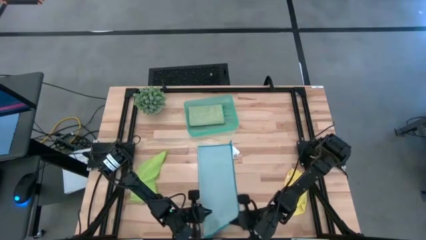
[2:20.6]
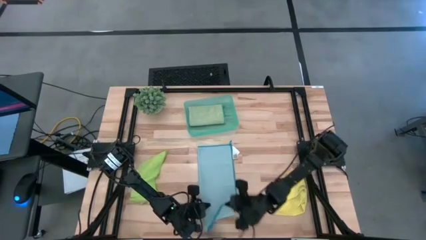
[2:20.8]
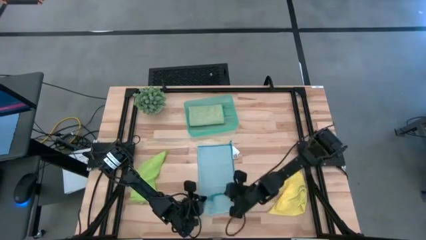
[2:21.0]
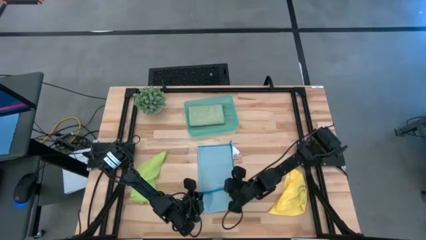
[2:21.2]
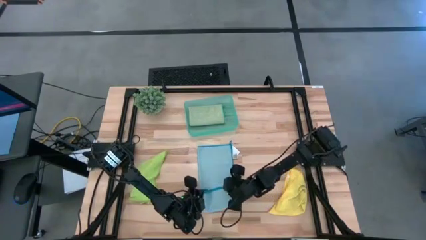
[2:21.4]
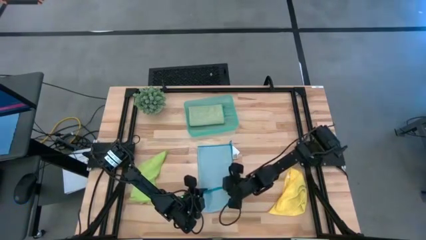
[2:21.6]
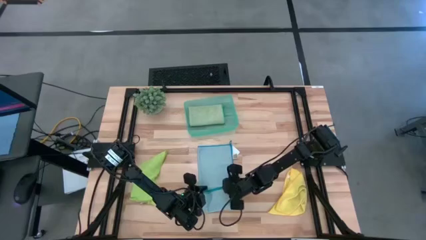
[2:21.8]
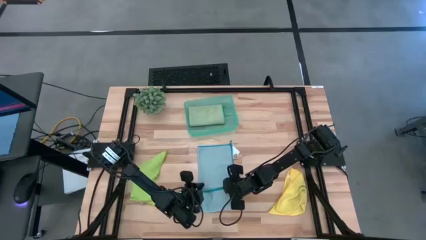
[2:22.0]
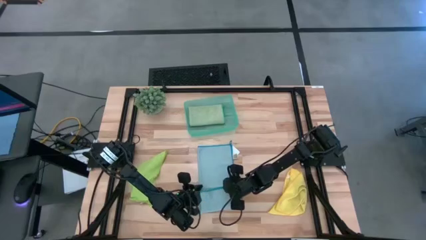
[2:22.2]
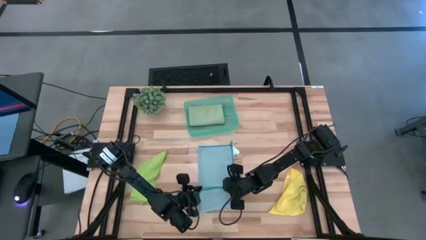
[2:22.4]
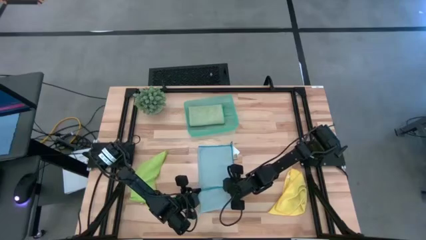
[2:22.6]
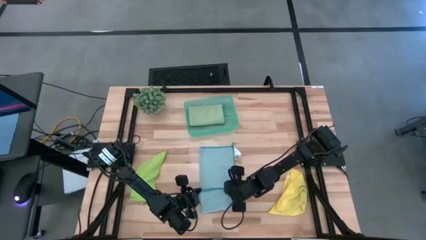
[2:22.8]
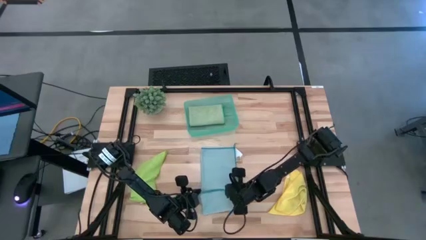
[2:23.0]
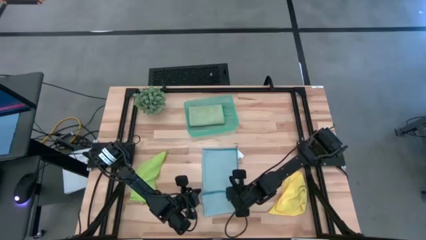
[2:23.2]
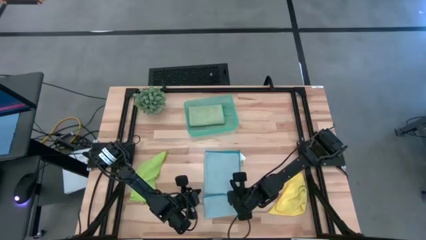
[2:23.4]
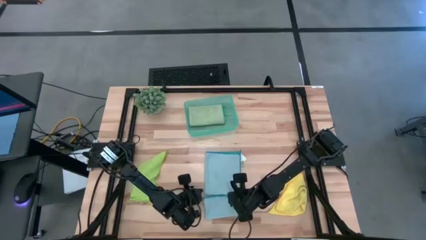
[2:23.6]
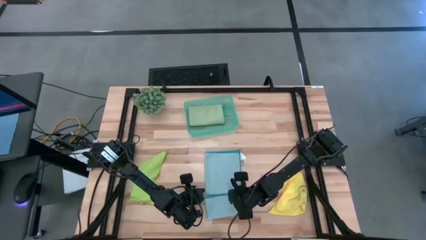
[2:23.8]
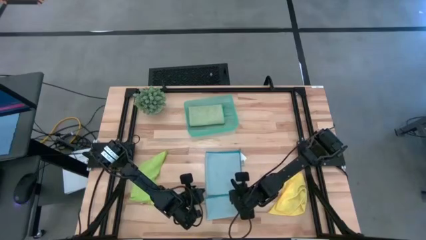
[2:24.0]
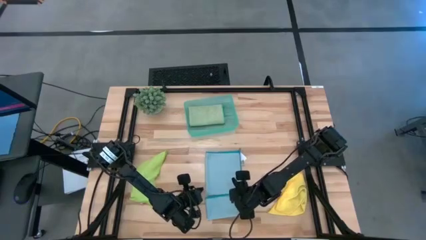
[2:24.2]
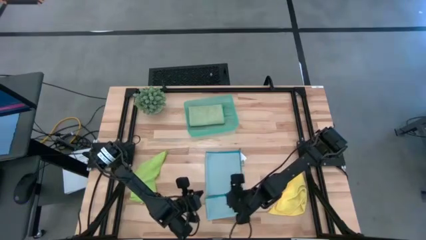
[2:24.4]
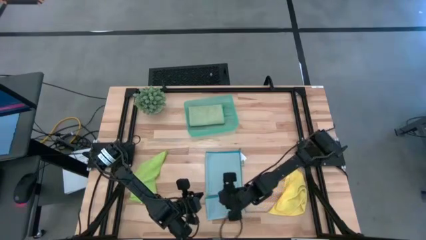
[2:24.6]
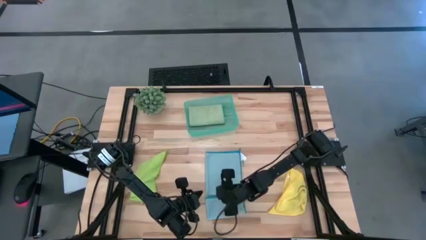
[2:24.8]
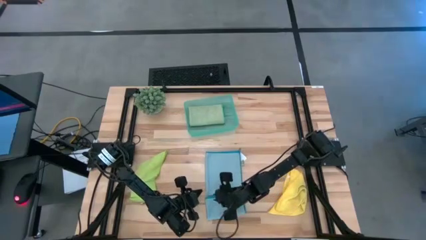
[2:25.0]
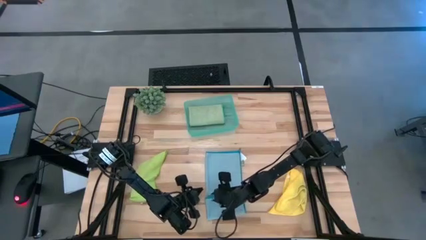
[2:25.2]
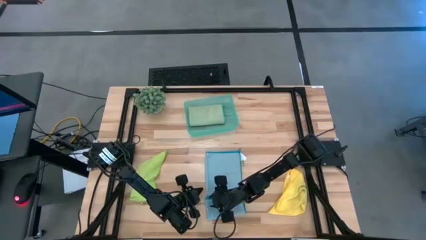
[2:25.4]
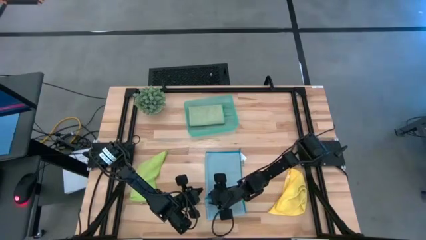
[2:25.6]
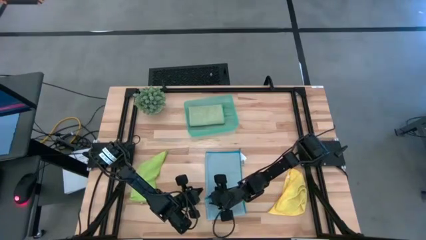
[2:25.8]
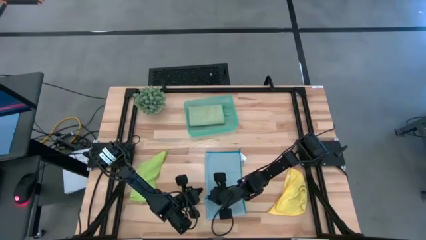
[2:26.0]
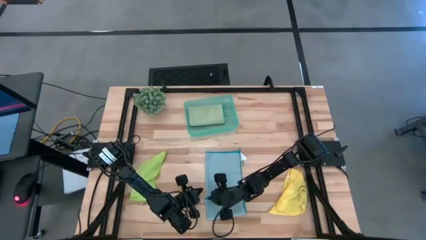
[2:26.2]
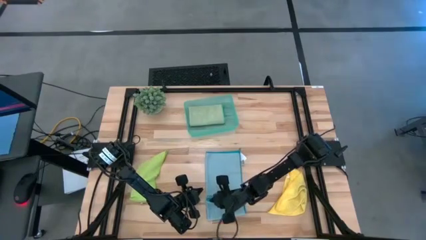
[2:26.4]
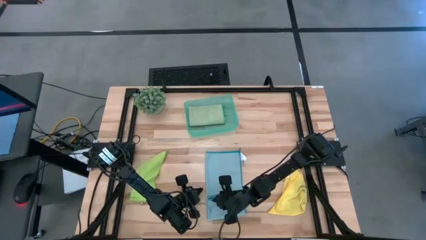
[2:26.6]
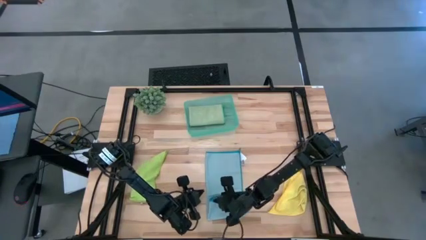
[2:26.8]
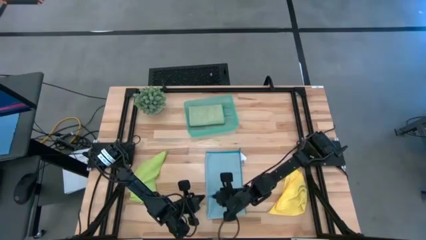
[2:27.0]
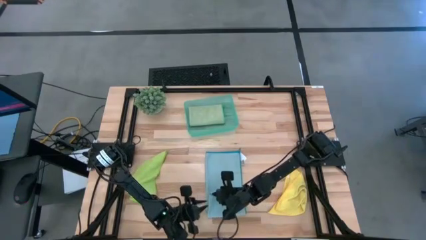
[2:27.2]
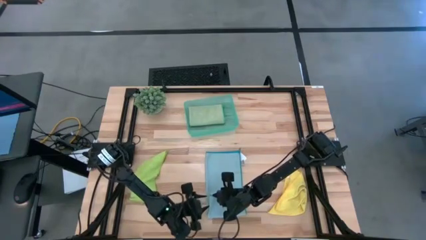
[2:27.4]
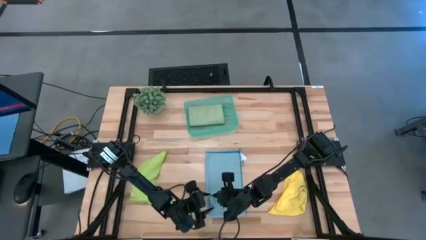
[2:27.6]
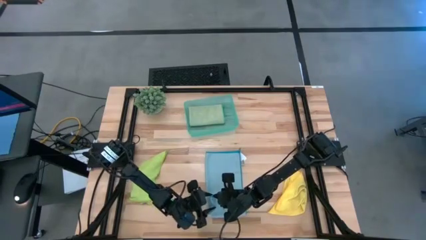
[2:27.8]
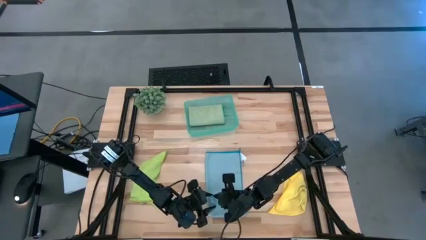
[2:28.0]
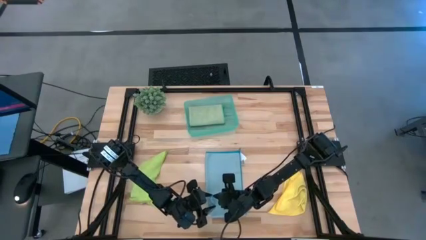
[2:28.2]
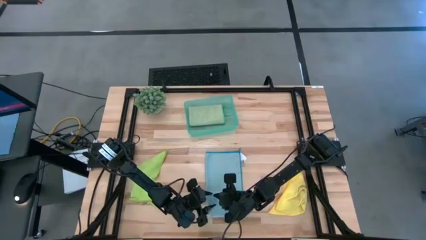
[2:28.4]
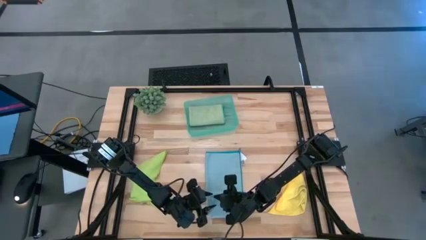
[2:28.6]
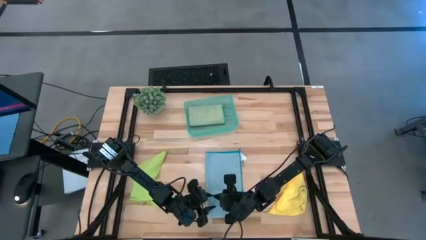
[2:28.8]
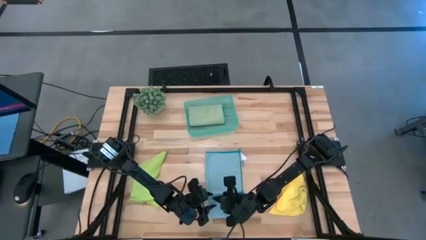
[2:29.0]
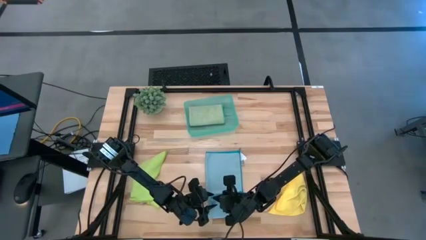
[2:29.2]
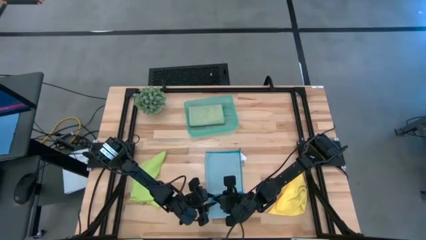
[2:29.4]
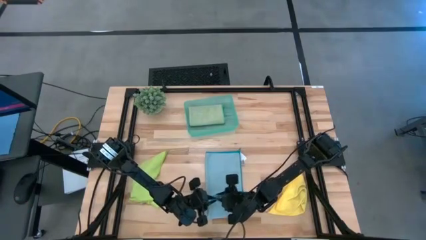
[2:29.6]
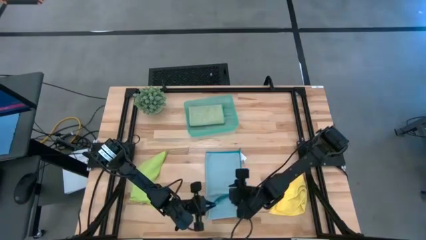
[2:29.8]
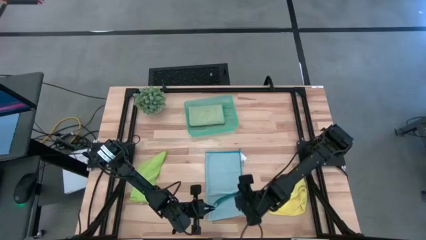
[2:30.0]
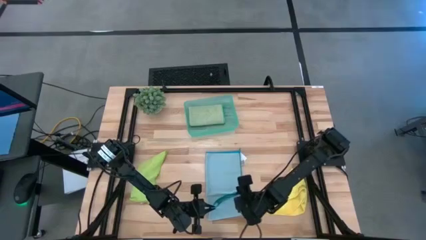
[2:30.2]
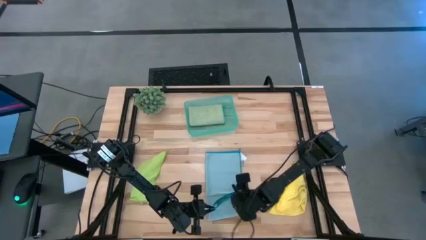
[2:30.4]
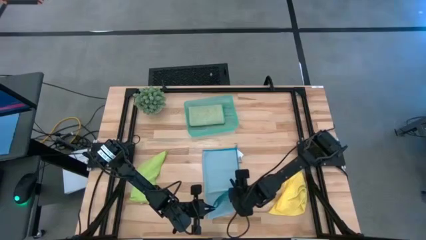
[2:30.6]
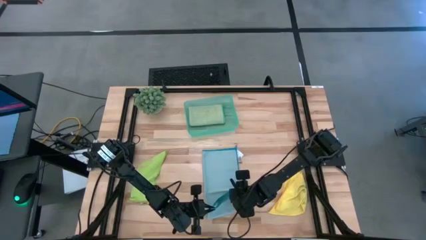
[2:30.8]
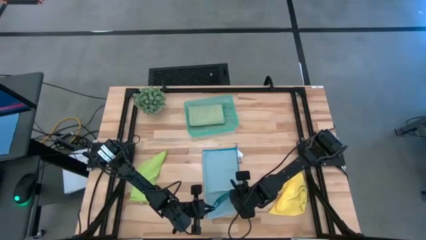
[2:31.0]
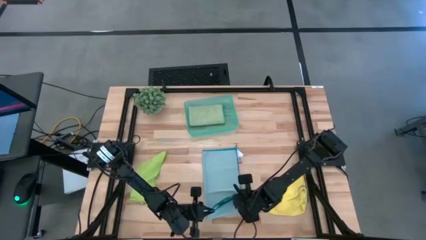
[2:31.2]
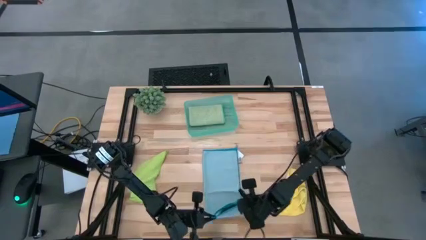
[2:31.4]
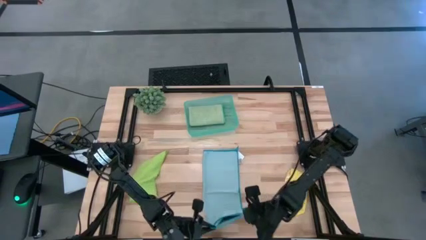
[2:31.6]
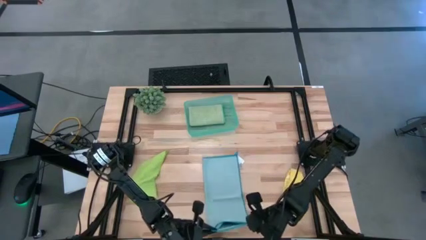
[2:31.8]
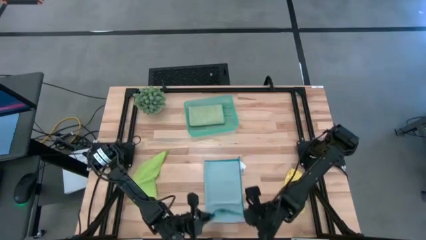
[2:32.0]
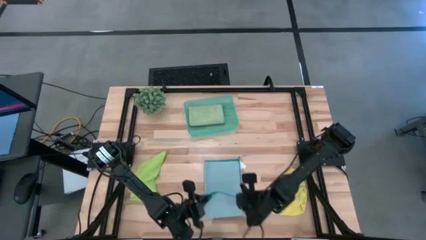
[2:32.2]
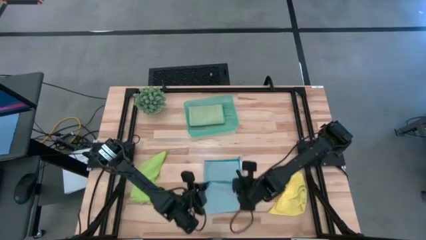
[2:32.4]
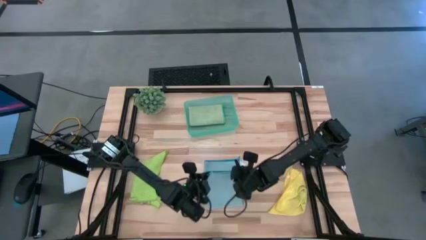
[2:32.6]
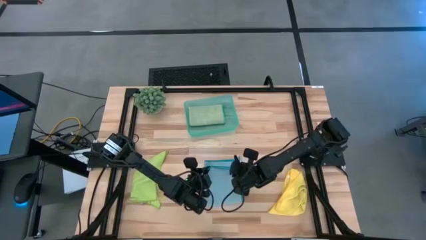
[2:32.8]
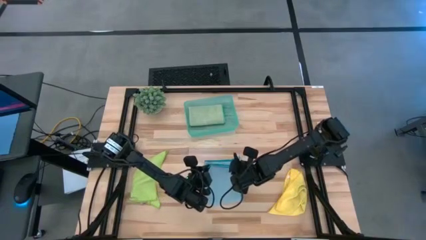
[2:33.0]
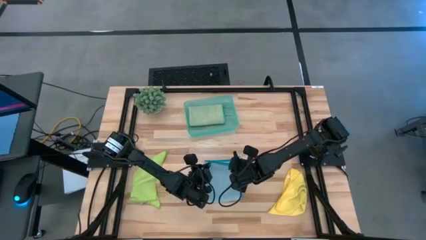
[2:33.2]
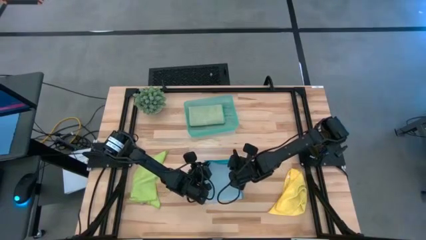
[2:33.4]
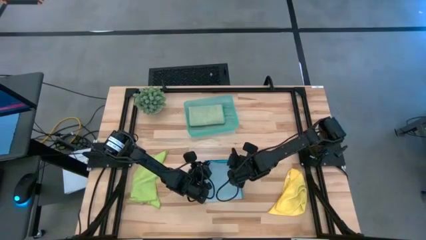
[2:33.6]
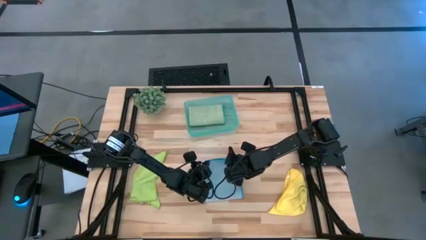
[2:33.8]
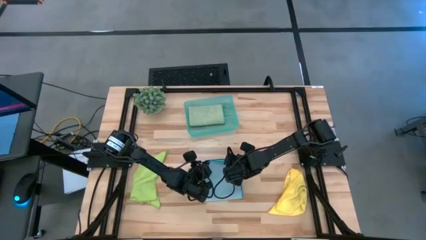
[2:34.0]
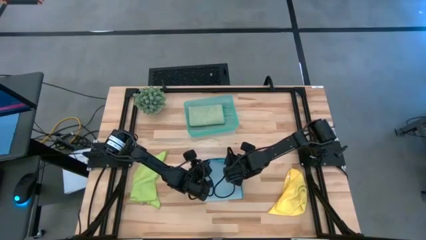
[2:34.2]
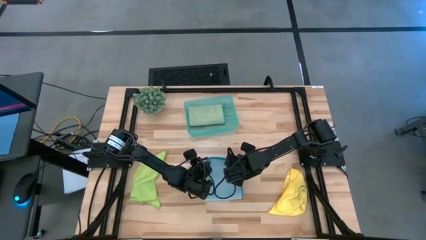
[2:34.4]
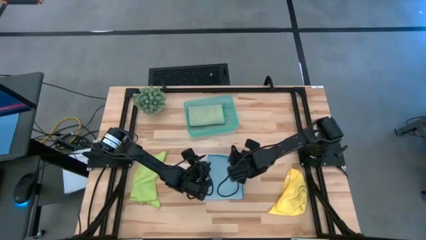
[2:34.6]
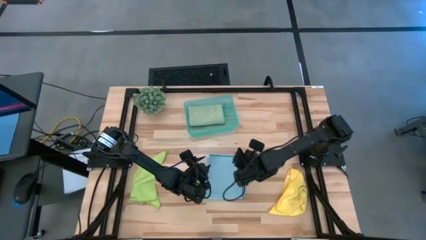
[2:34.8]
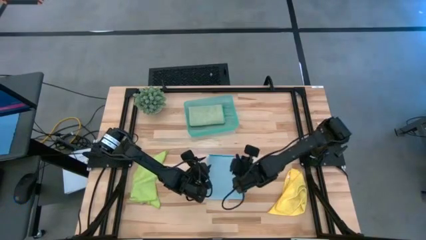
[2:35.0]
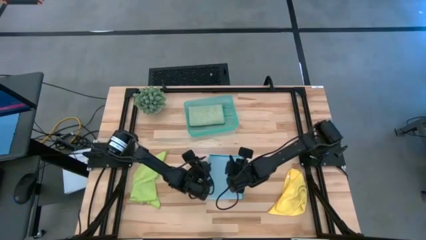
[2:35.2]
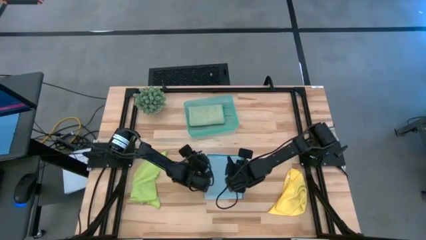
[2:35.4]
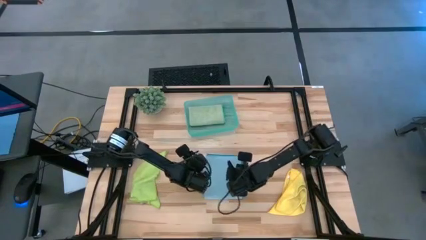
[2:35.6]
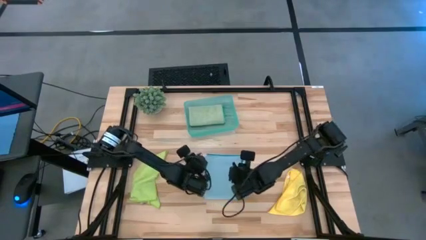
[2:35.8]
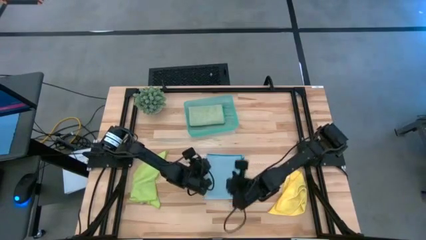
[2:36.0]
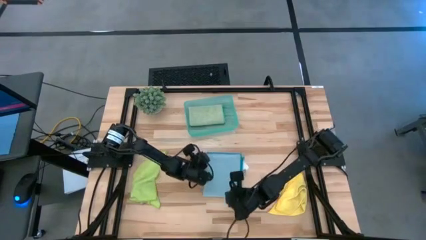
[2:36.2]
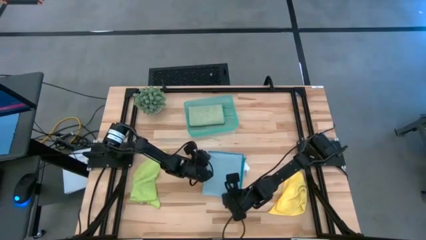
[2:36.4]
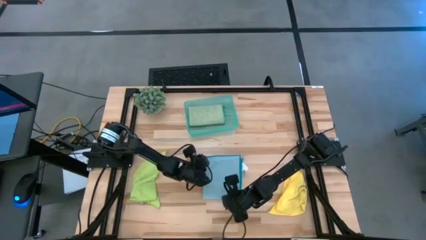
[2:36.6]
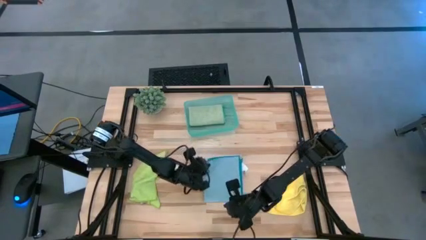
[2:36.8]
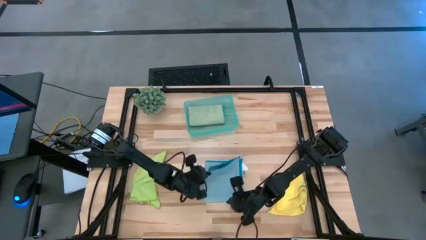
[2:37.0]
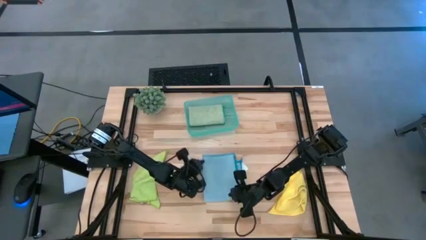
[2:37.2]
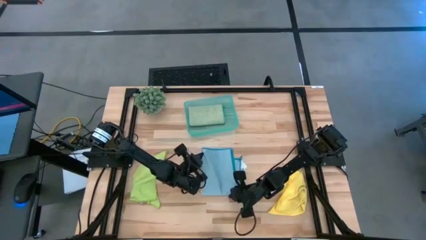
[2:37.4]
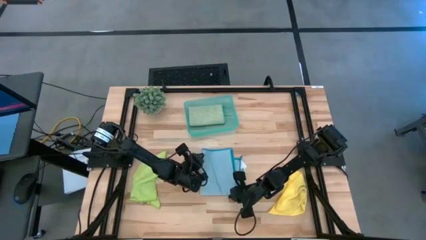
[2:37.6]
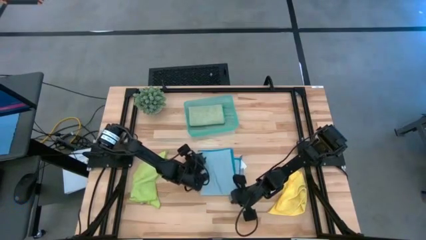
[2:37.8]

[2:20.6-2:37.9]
Task: Fold microfiber towels
Fold the blue towel
